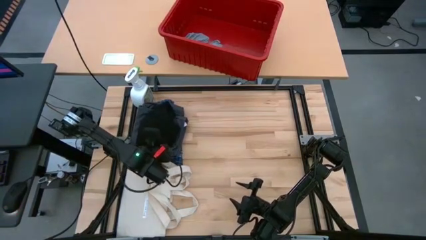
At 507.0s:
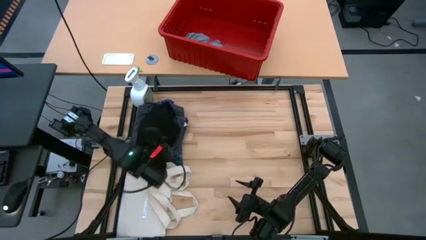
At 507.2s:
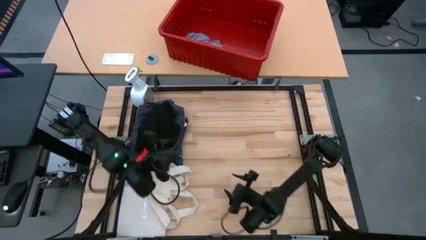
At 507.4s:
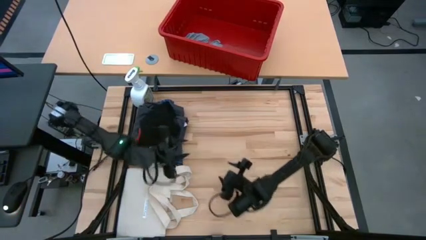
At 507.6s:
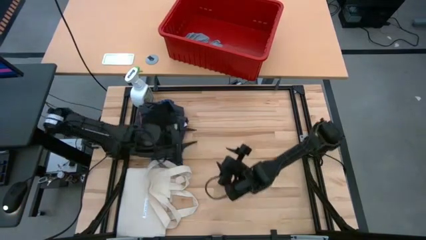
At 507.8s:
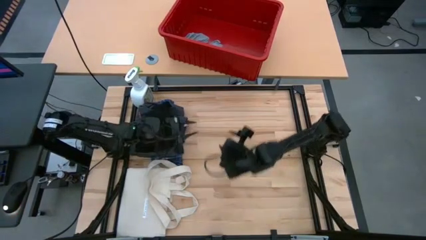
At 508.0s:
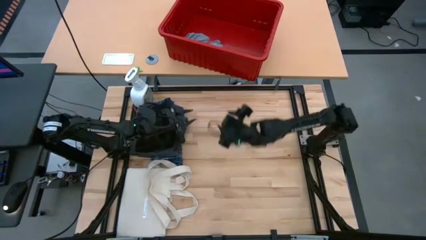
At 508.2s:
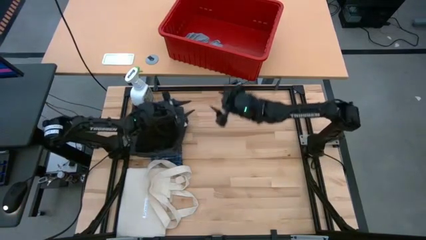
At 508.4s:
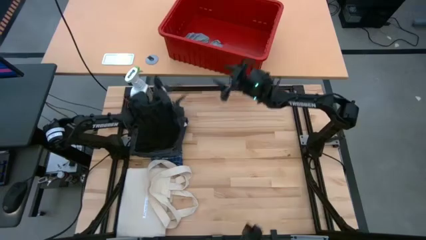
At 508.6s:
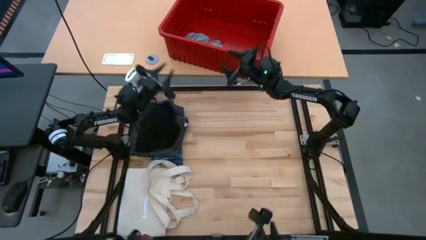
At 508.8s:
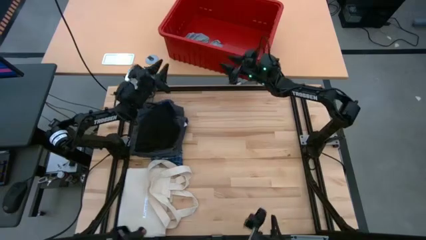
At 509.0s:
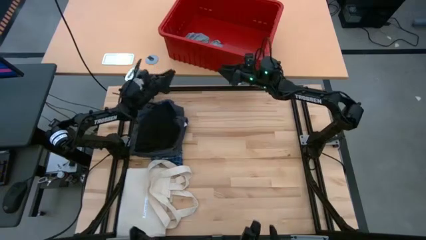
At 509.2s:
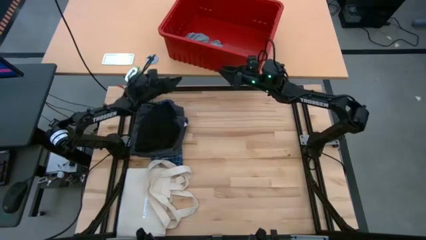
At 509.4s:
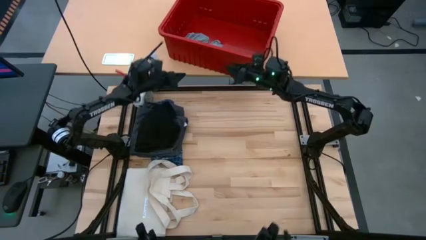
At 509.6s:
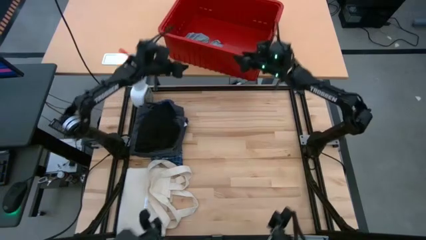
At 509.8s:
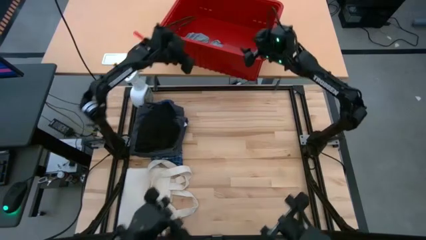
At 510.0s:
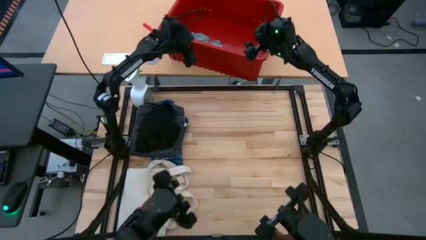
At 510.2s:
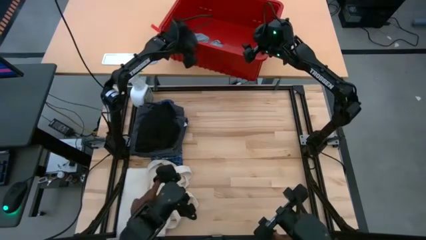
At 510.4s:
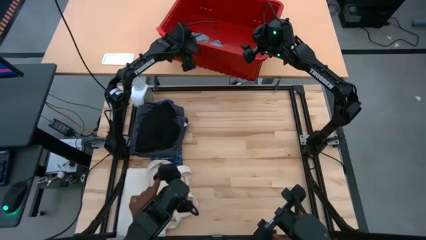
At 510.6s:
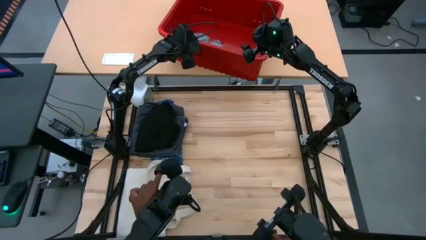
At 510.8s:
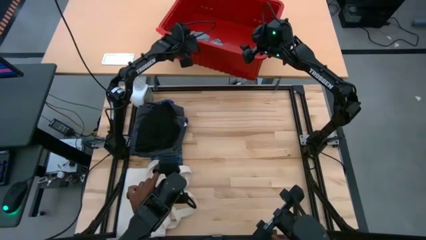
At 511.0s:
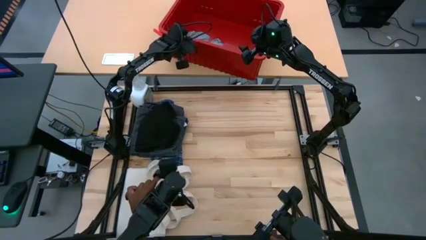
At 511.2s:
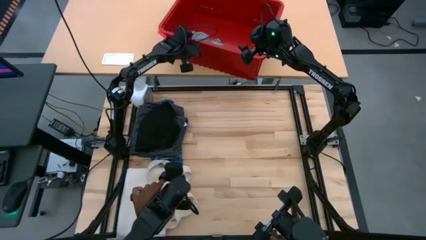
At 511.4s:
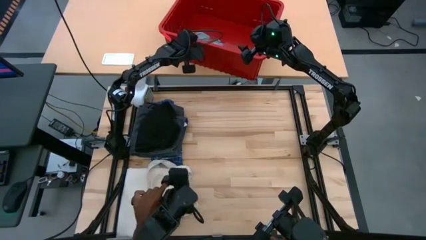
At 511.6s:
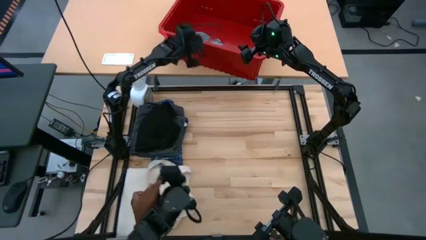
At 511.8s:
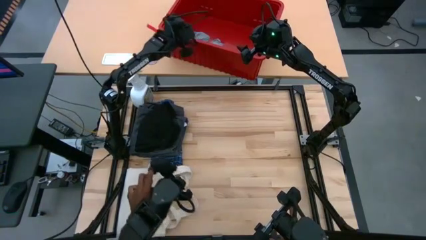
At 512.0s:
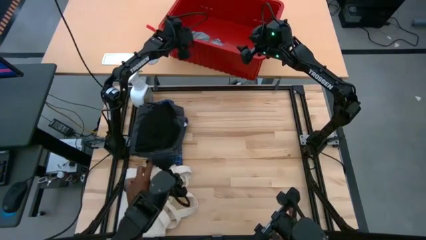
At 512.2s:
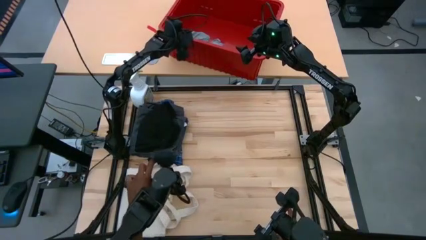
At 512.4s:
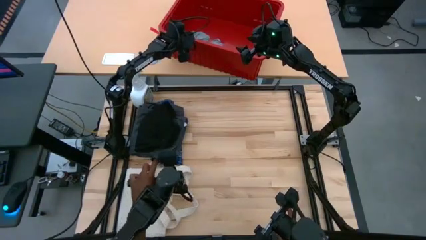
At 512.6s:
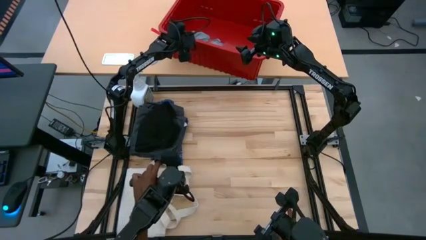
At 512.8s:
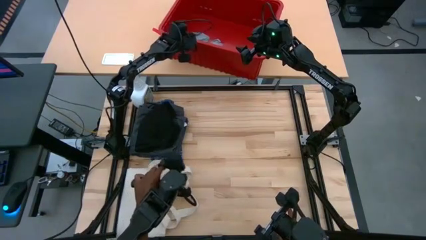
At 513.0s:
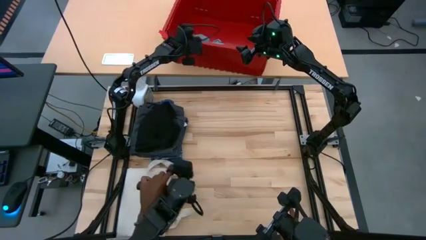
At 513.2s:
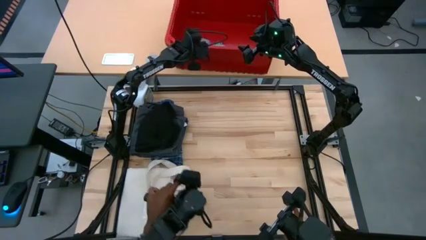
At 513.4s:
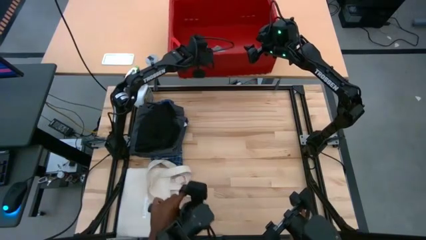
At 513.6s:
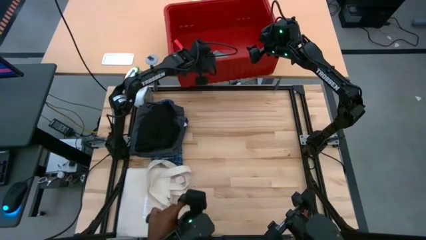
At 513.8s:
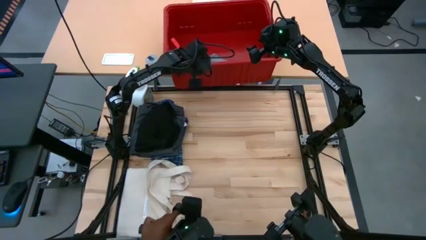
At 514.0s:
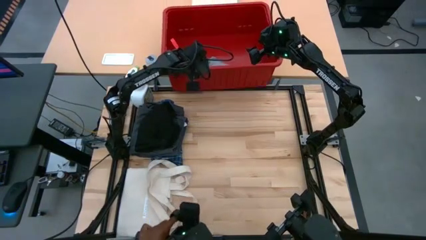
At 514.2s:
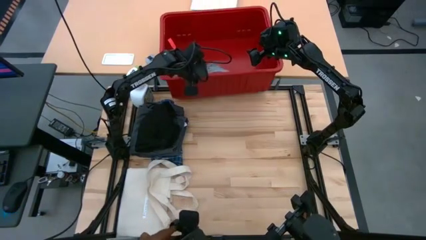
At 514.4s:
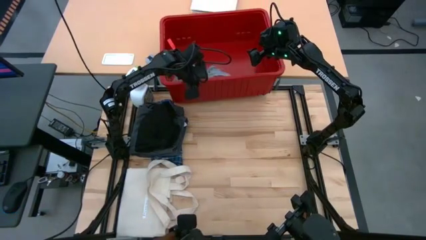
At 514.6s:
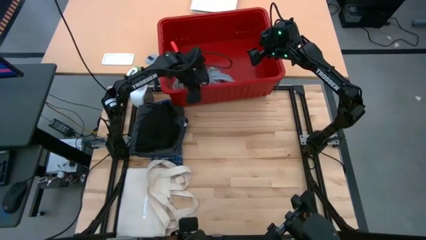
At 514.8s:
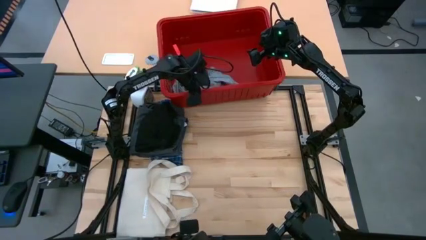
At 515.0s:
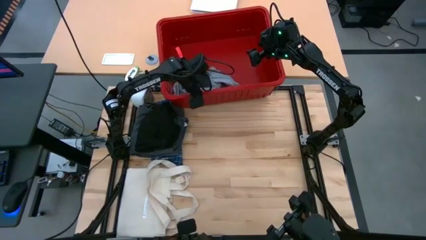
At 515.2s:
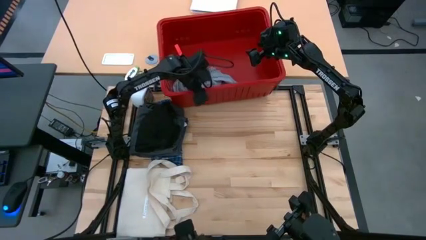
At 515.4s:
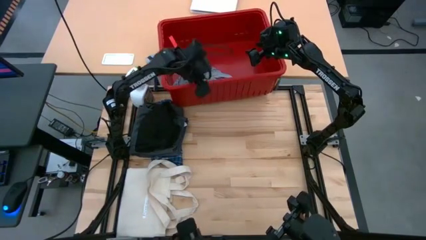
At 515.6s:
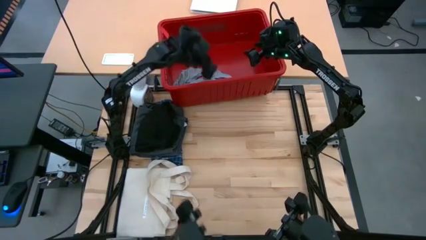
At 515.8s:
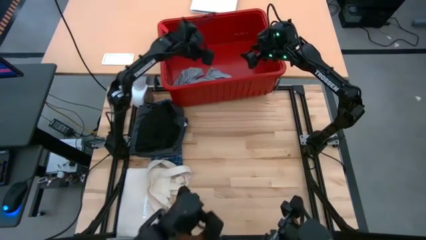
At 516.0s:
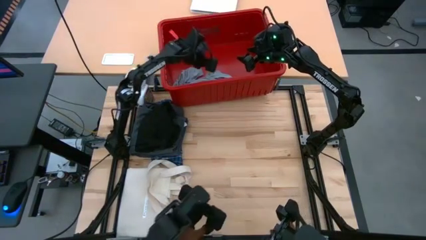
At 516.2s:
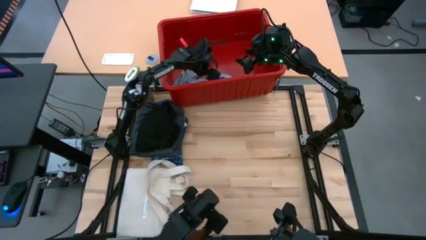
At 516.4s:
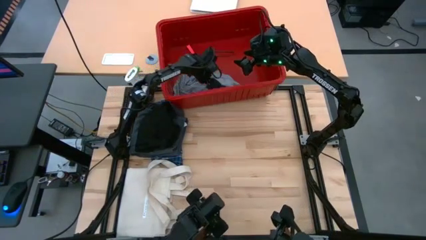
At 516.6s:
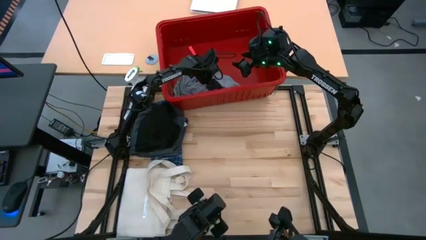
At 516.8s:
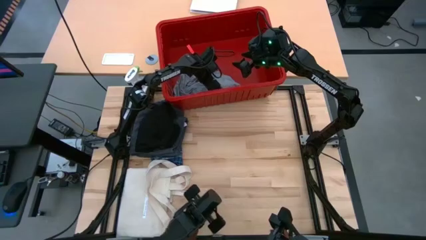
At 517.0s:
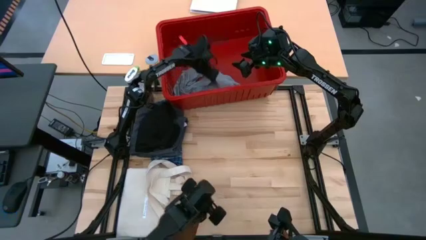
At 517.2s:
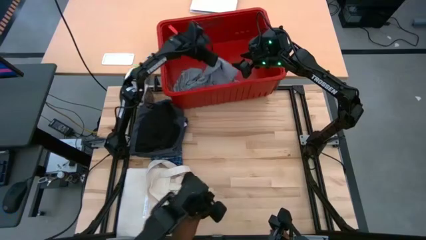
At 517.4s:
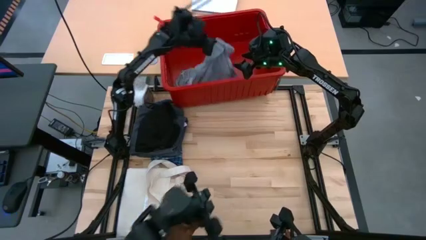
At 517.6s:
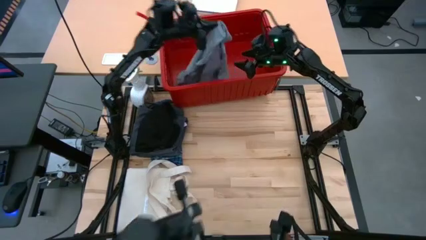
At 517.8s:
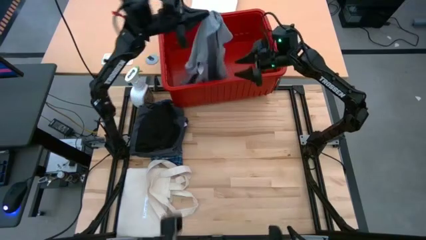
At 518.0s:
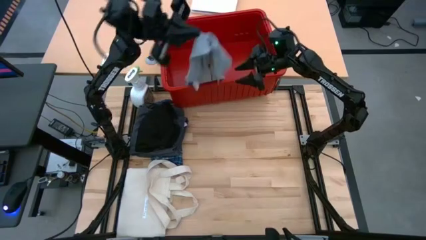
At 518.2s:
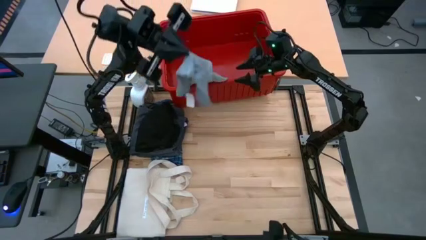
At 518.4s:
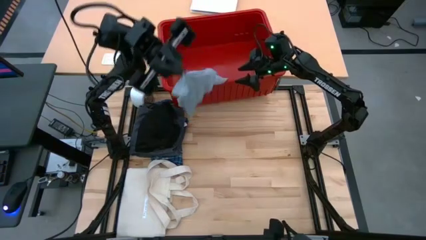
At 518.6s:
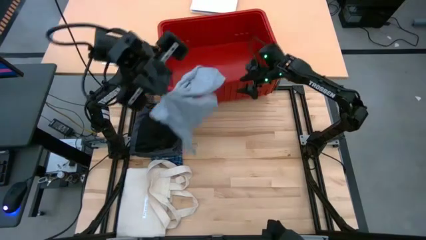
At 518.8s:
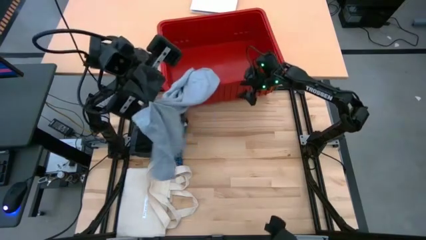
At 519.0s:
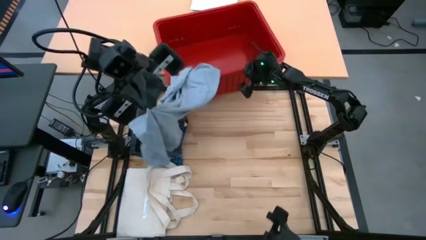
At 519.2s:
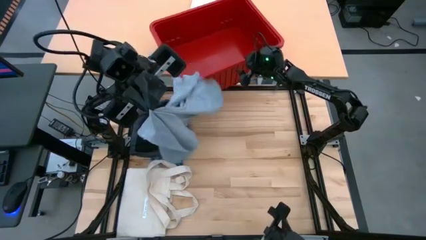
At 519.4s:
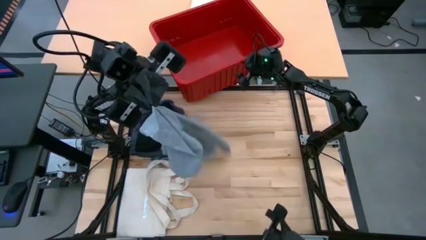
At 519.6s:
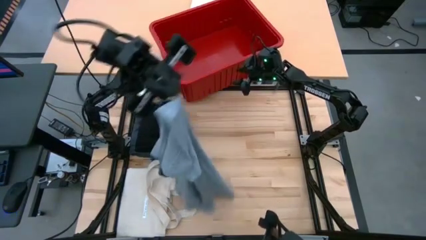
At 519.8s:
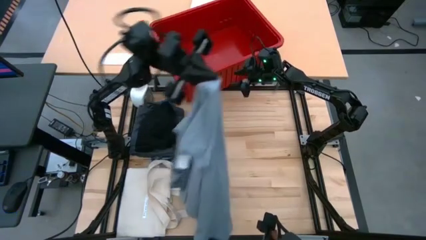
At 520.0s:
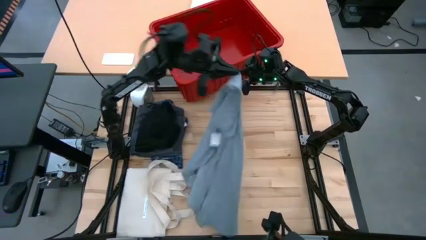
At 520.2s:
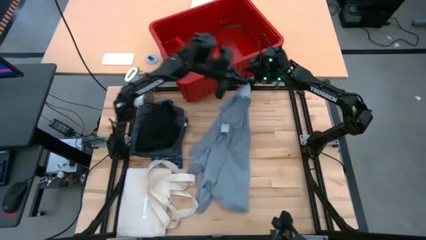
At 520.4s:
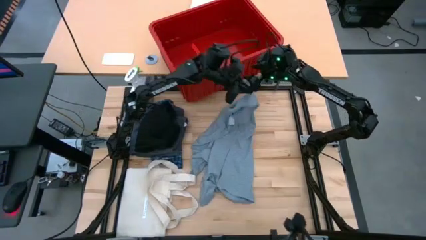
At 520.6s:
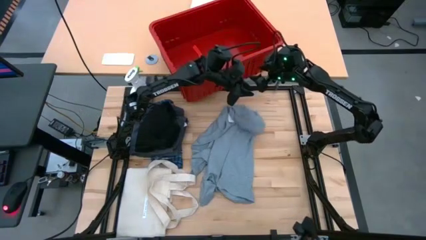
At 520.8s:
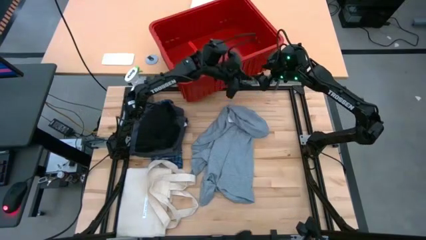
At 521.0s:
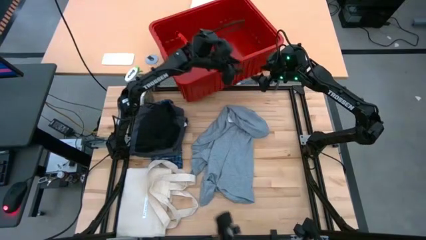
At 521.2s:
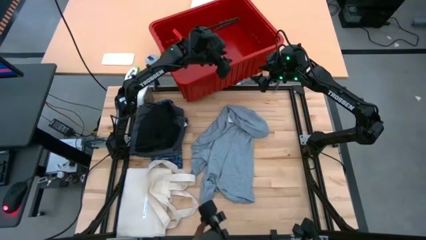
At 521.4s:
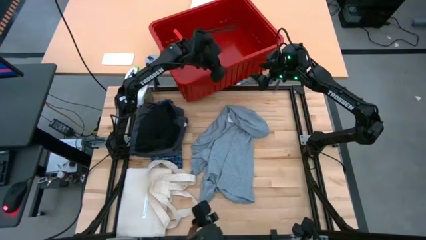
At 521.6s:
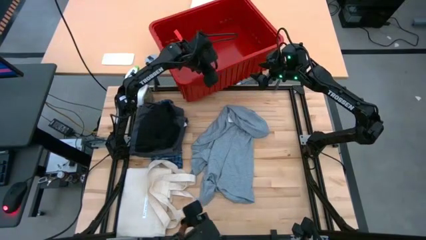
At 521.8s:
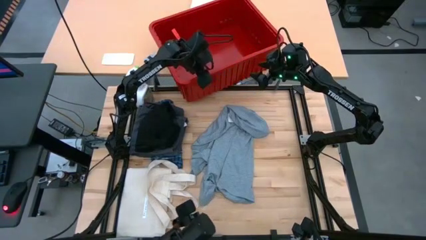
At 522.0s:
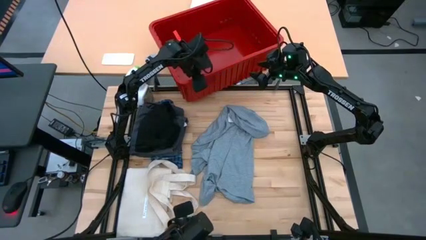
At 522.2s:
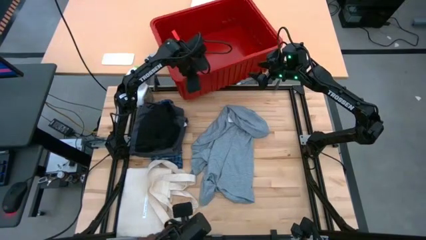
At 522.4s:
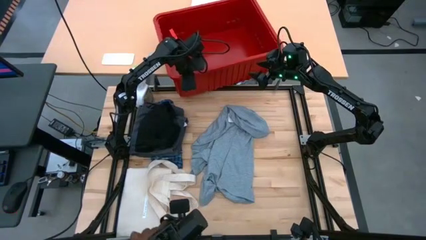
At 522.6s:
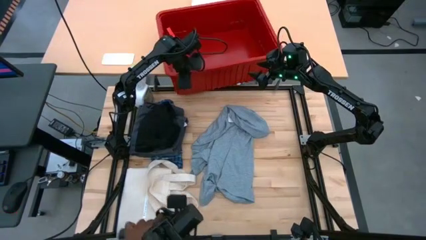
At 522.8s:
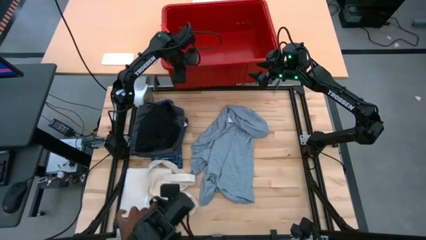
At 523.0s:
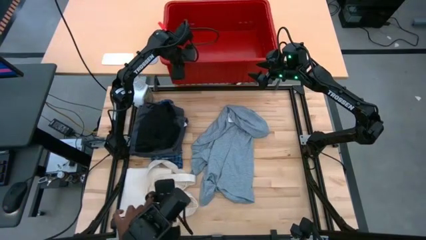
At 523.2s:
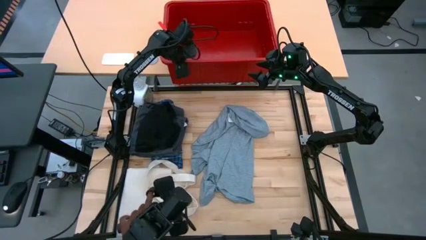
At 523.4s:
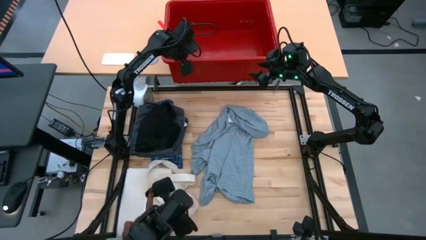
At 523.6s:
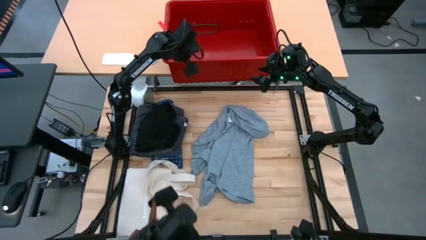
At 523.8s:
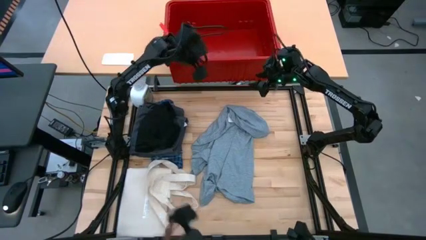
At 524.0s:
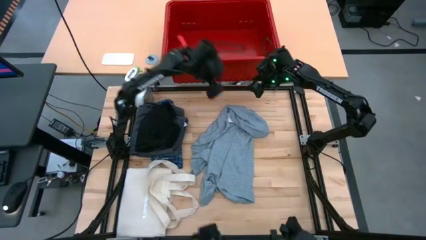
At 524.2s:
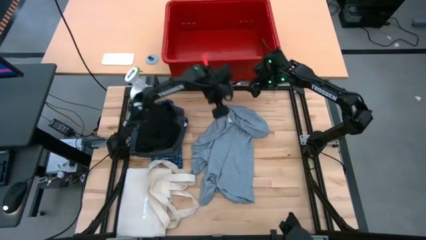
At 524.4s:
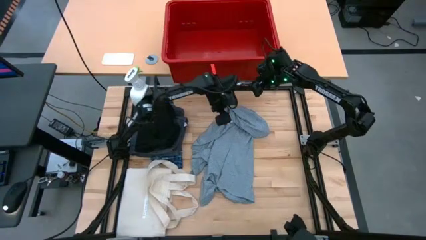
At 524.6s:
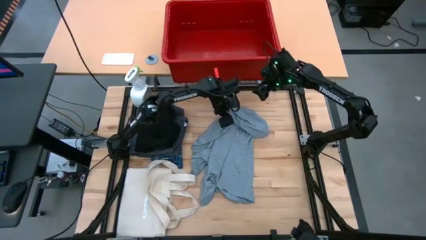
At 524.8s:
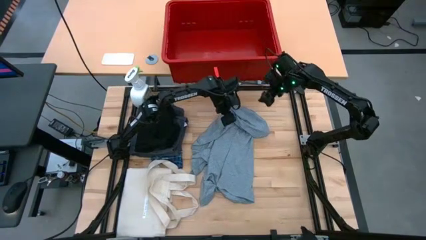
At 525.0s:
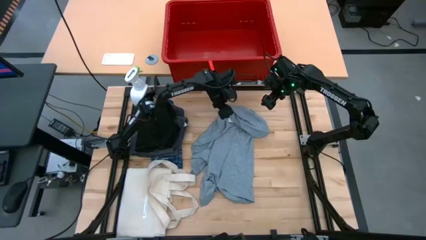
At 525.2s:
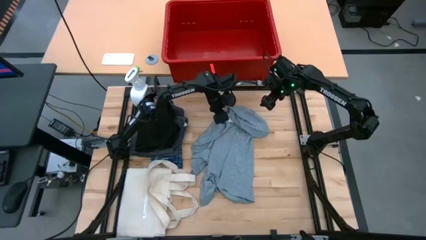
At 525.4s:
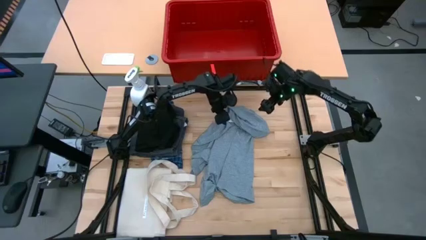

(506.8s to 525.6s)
Task: Fold Laundry from Bin
Fold the gray shirt
